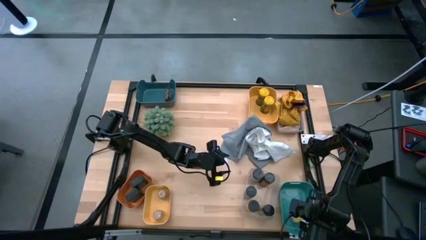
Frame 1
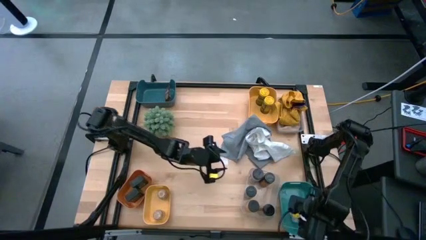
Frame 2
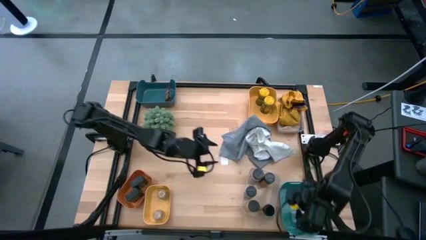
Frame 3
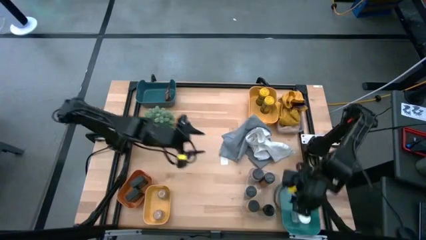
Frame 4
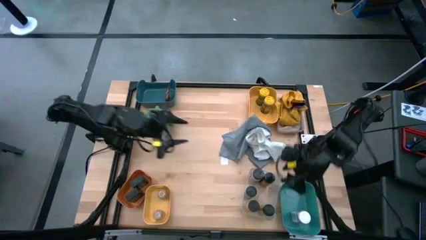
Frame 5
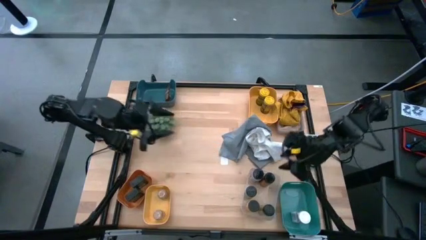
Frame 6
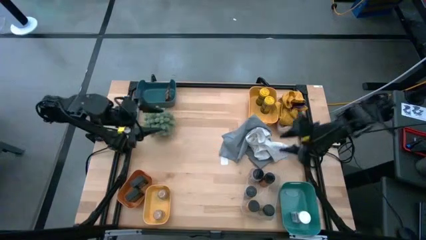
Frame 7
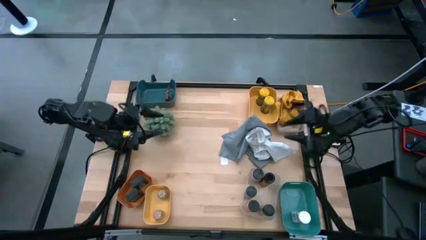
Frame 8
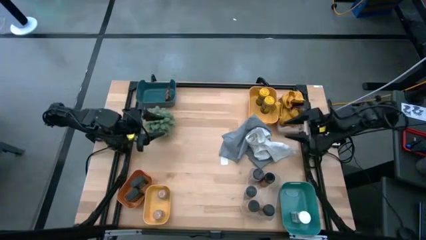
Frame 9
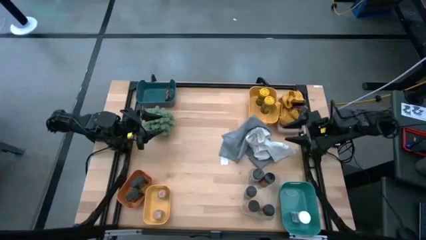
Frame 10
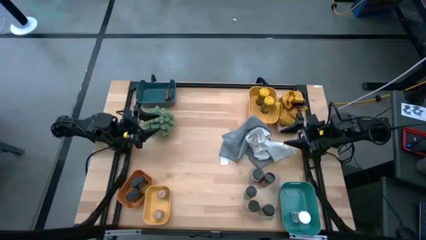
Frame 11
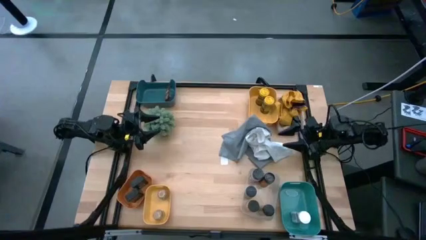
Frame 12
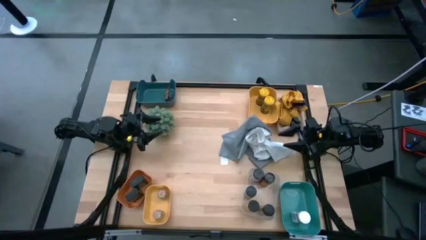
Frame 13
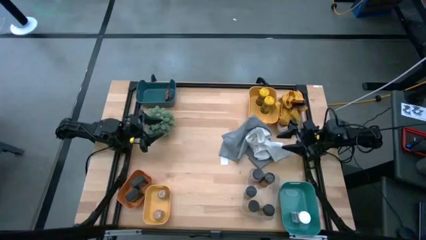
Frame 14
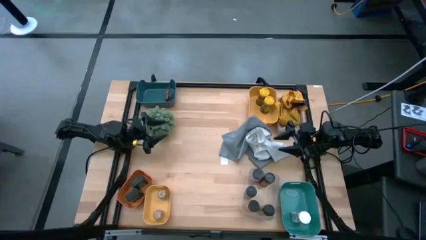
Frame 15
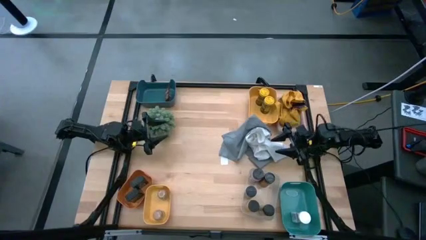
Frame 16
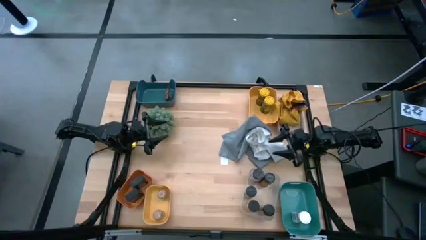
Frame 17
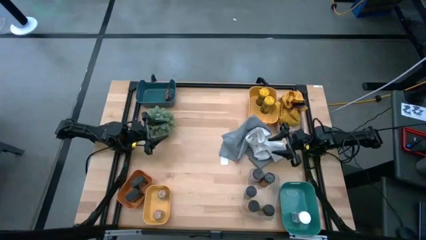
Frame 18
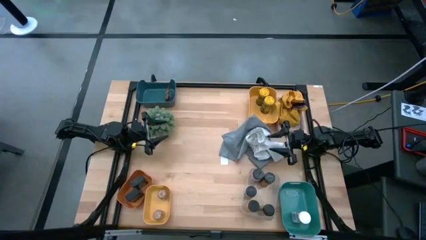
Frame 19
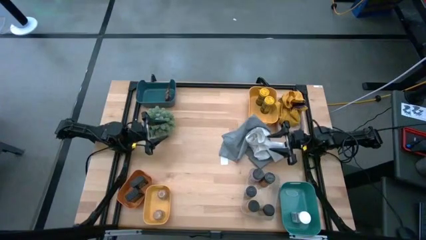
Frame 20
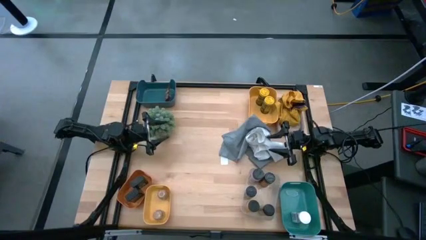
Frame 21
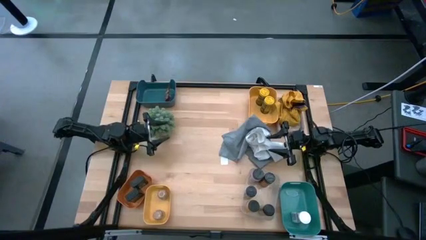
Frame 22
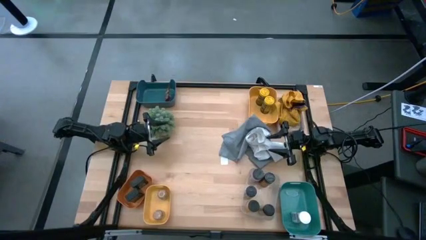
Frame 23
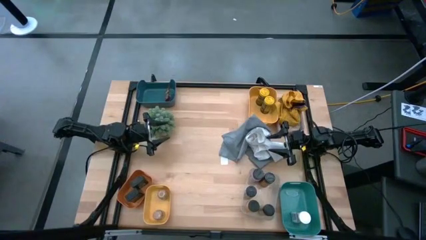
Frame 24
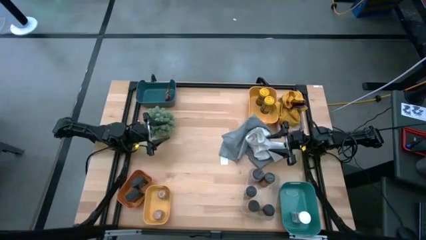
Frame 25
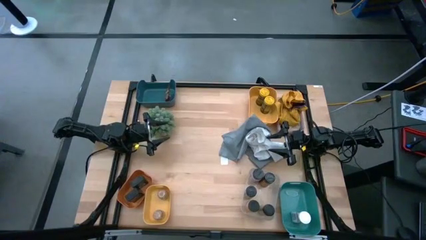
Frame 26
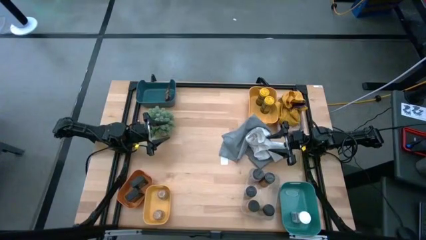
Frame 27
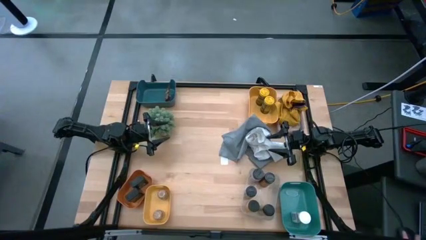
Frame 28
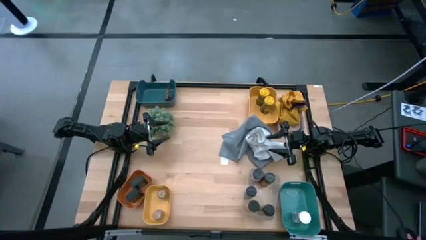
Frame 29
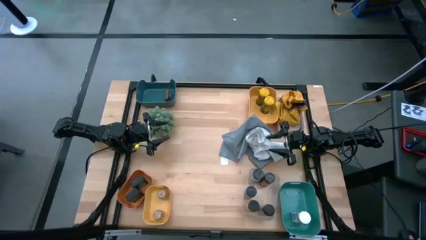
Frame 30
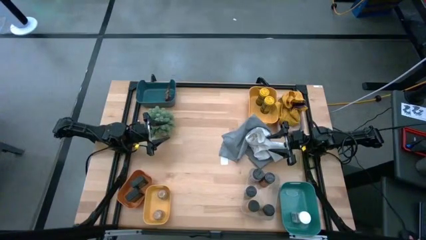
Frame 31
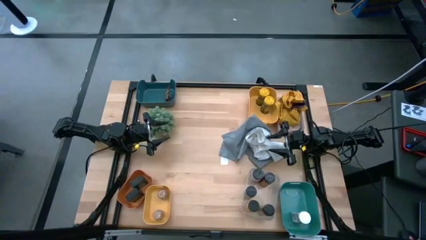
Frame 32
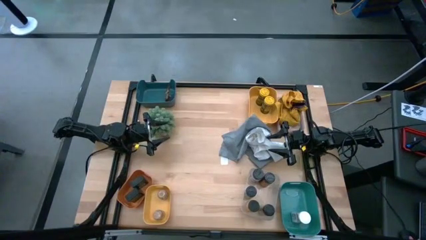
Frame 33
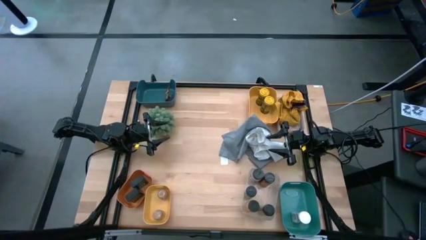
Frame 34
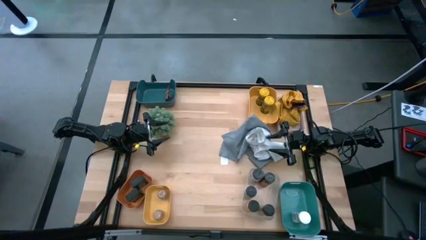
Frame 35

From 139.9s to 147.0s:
Task: Sort spices by type
Return to Home Position

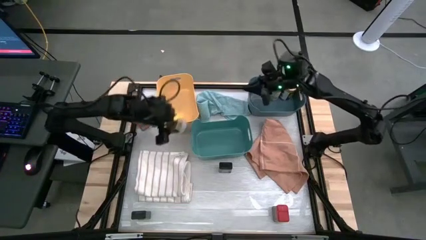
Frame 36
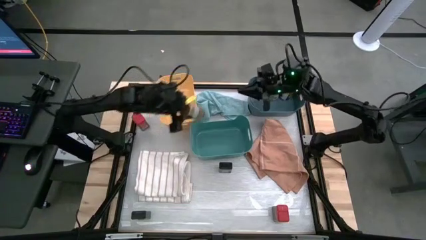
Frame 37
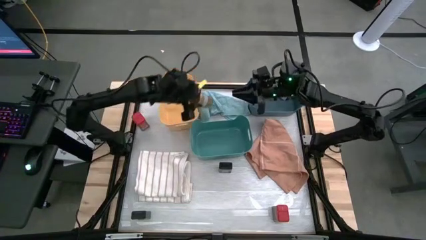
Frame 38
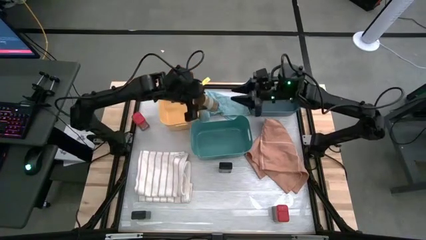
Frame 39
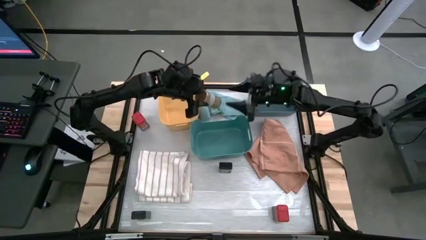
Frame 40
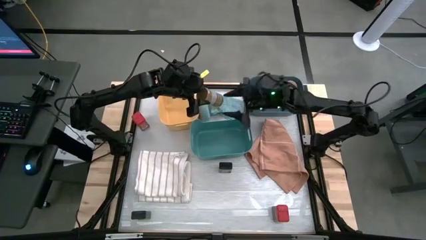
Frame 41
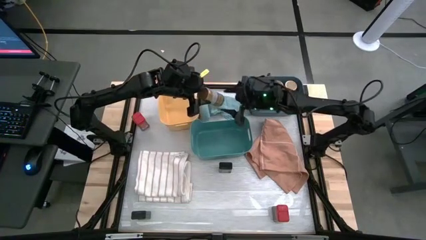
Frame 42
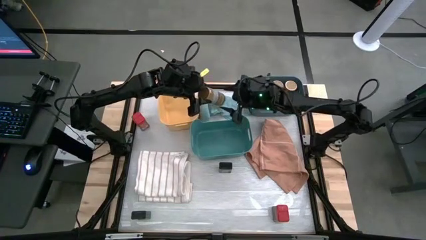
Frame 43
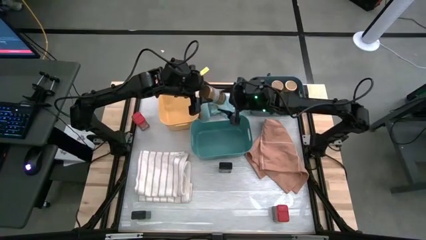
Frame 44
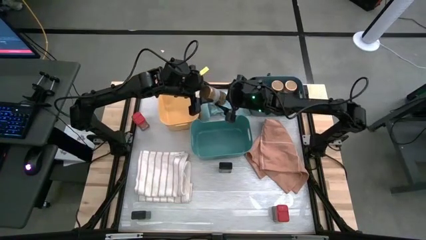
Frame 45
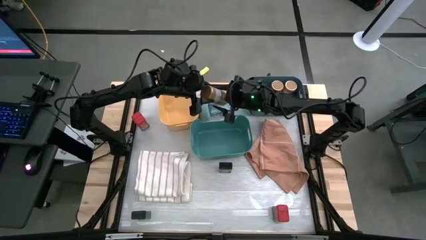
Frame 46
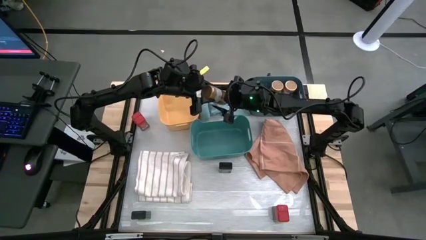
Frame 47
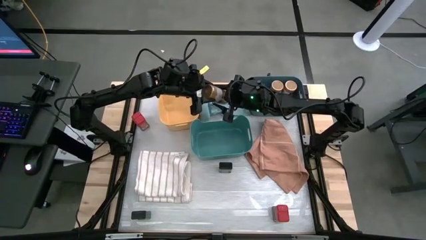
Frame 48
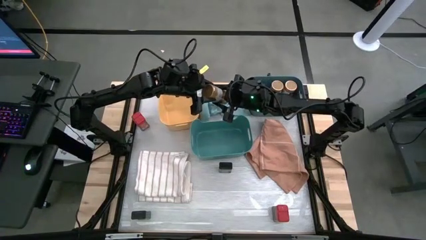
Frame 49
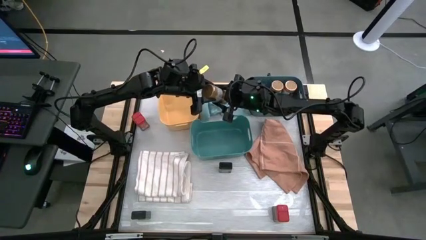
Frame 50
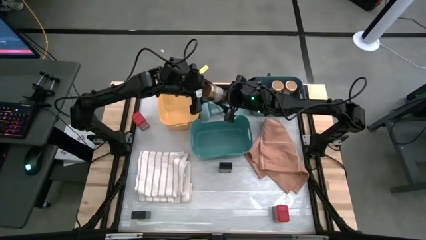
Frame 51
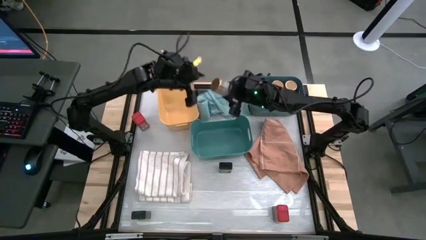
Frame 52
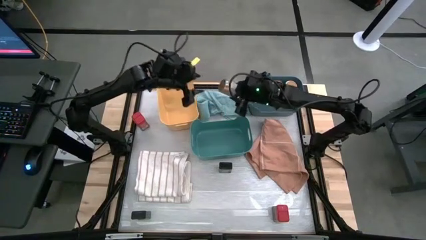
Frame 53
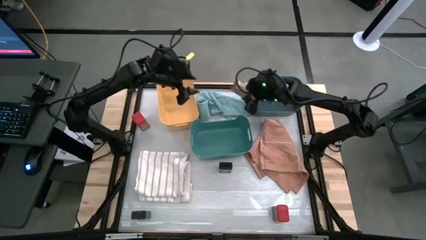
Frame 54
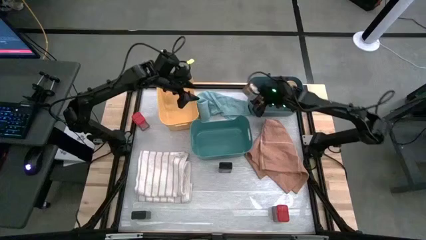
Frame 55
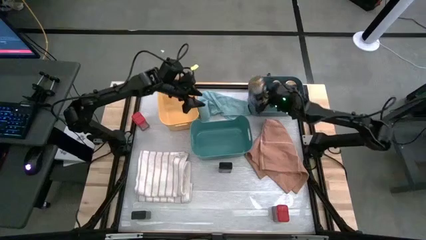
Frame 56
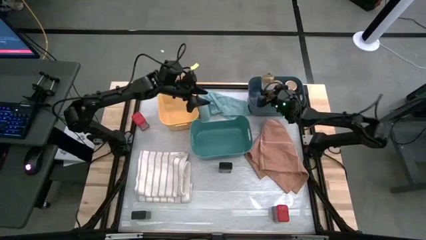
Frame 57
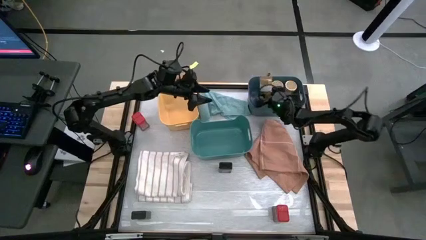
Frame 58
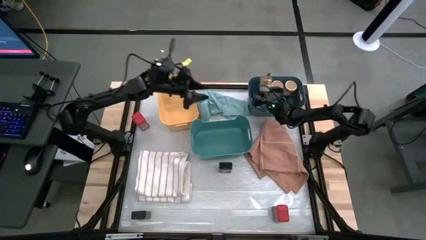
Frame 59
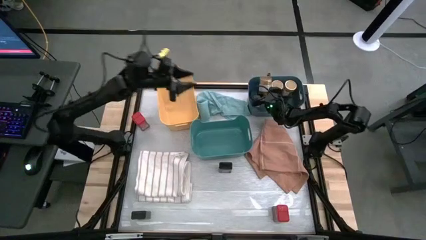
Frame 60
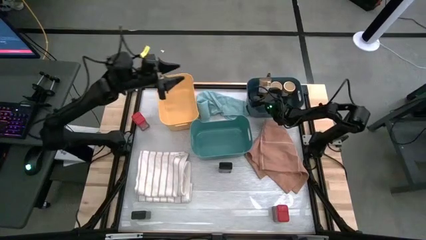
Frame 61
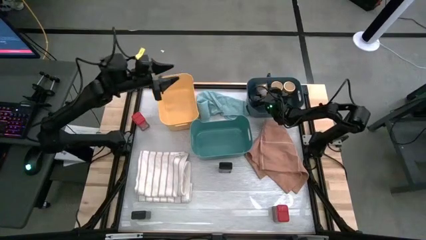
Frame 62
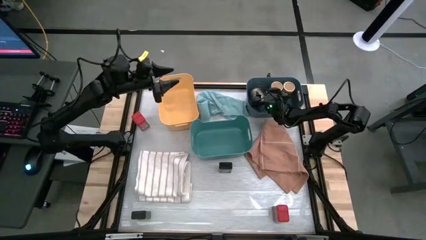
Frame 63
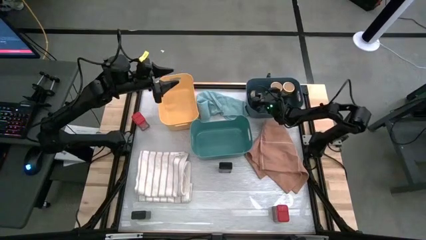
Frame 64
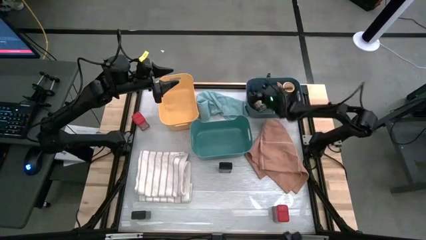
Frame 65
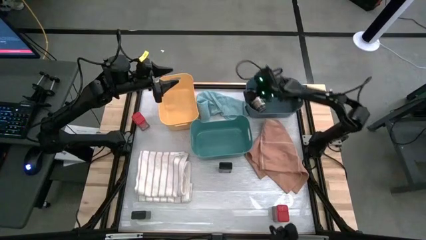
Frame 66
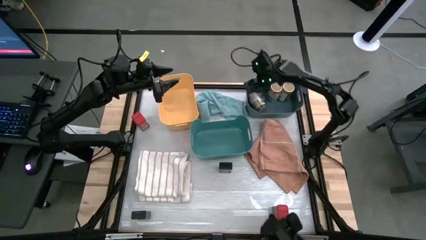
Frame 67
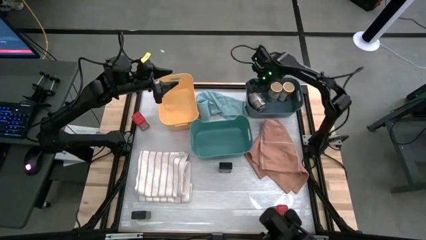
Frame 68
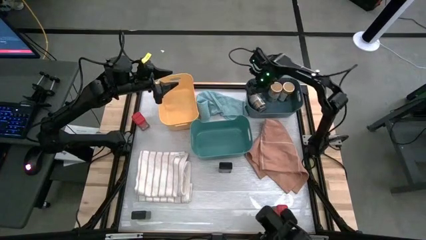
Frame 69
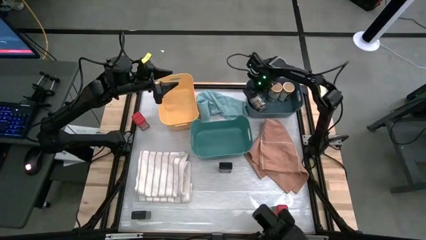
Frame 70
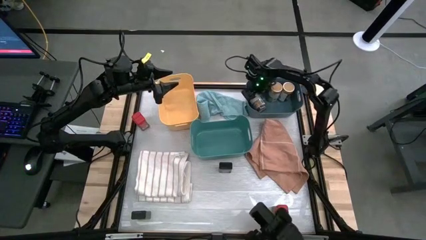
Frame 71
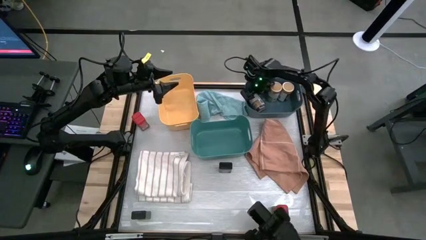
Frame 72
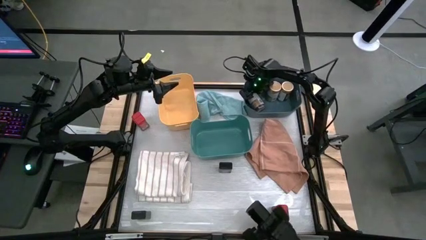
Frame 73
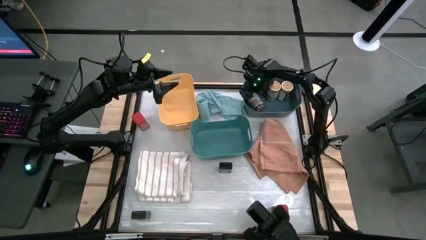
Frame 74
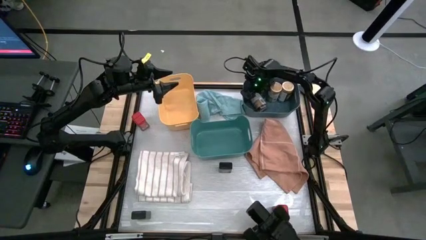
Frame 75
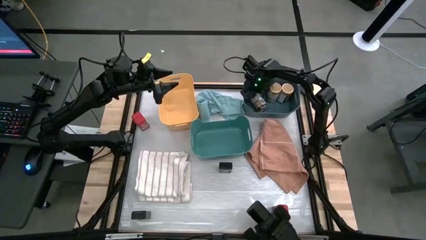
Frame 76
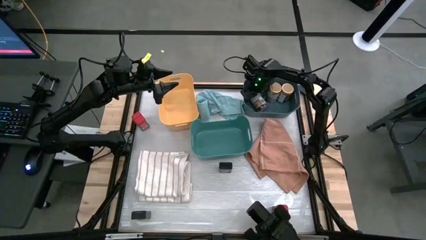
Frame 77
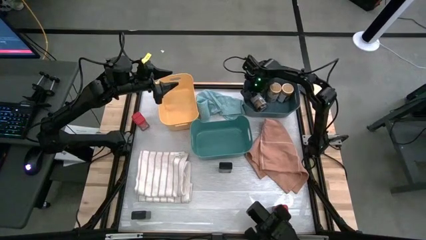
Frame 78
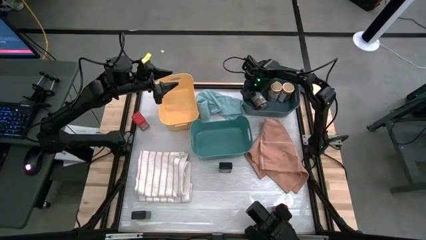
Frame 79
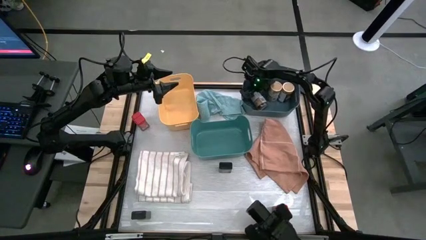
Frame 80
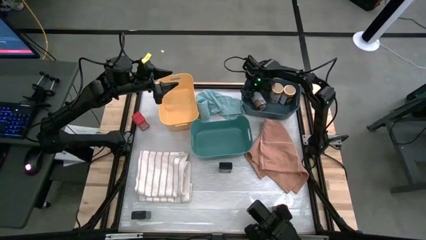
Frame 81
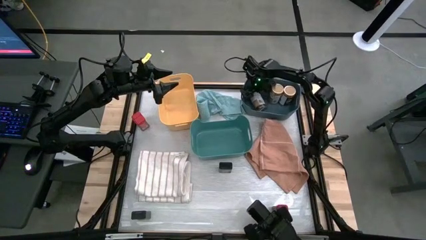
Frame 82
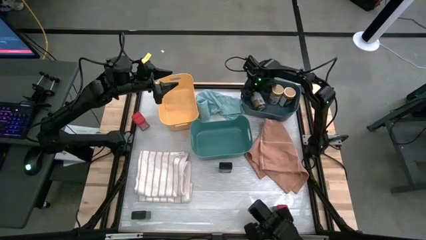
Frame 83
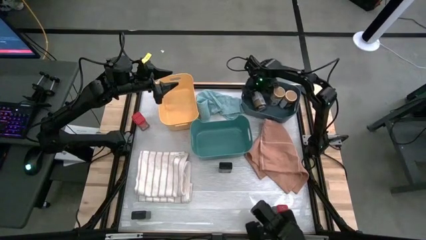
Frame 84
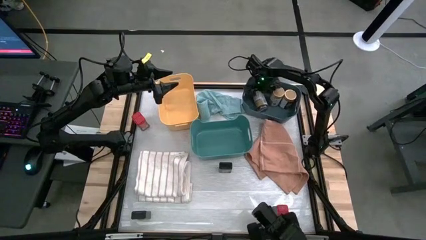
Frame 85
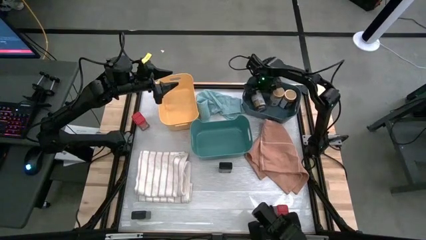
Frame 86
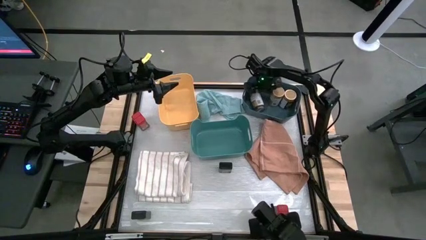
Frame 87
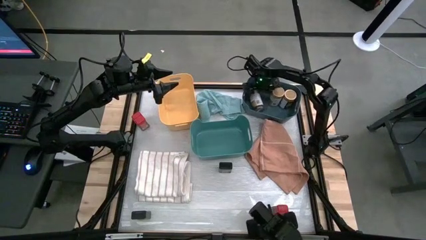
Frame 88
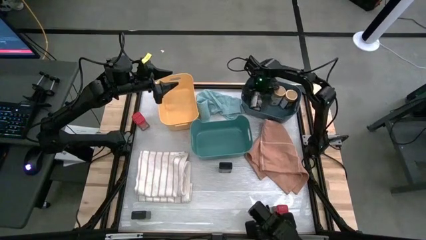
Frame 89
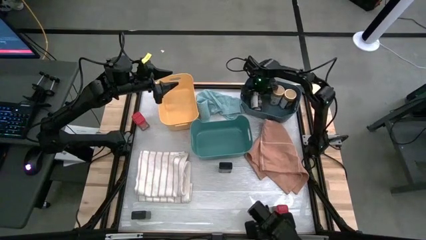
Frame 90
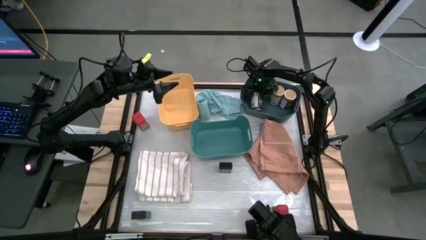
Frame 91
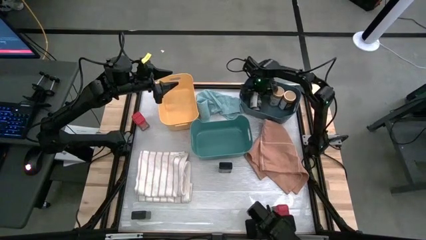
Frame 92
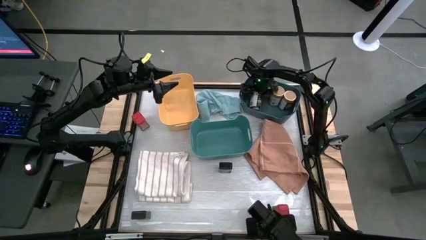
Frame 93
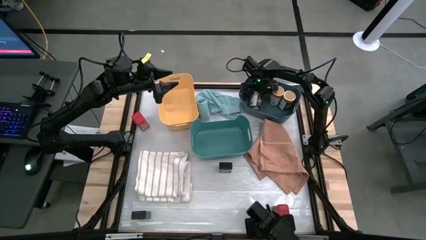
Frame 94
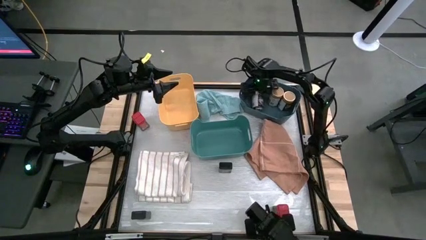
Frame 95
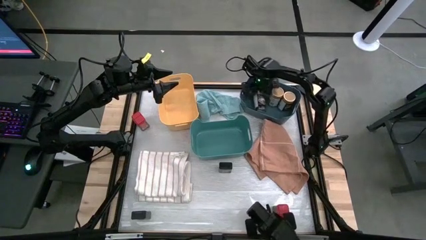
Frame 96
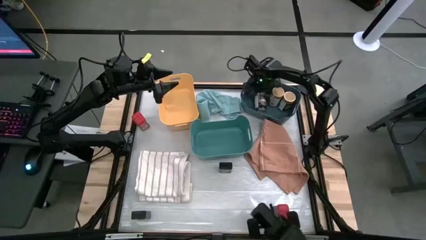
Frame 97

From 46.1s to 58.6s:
Task: Sort spices by type
Put the gold seasoning bottle into the blue bin
